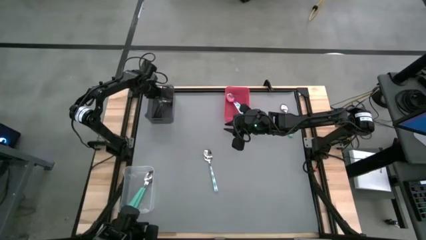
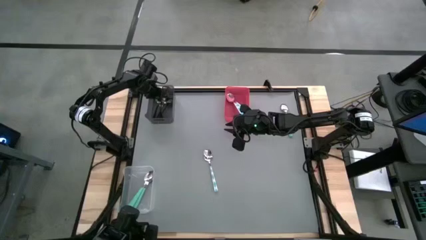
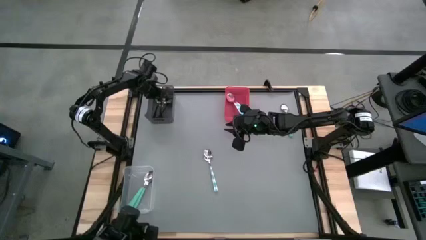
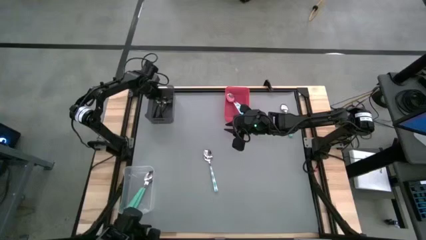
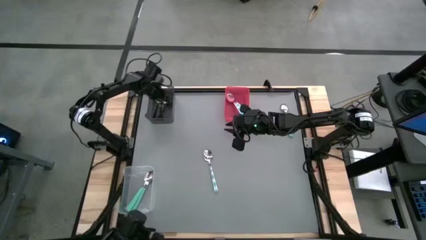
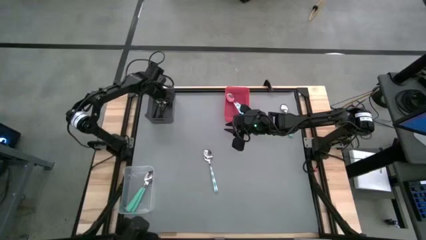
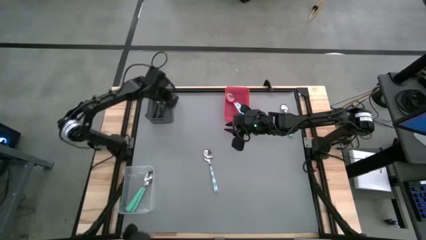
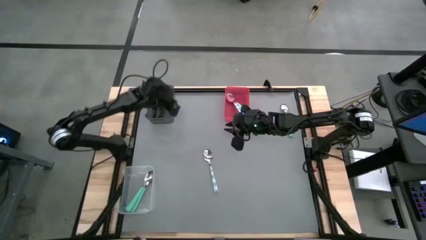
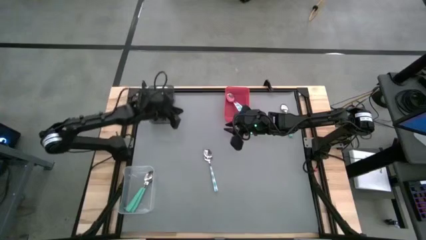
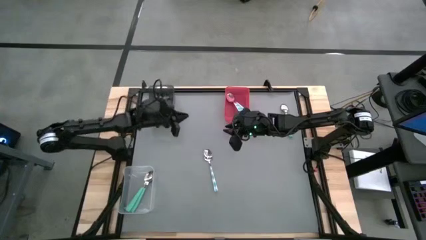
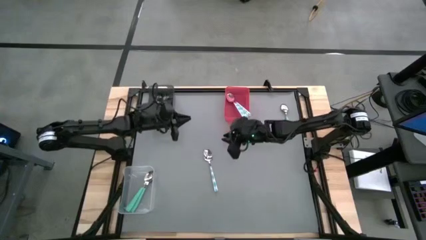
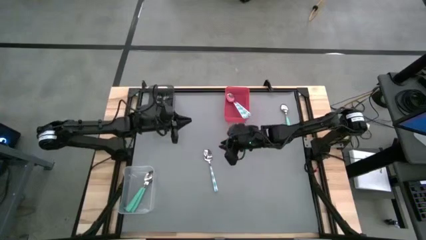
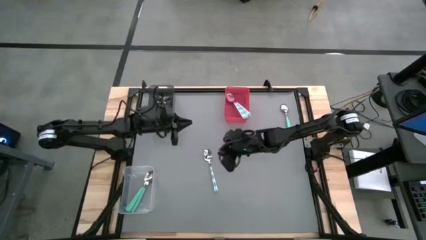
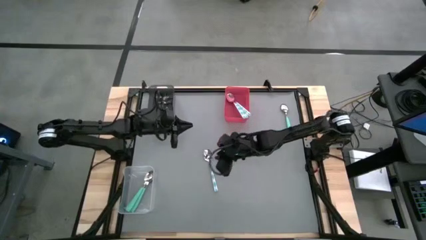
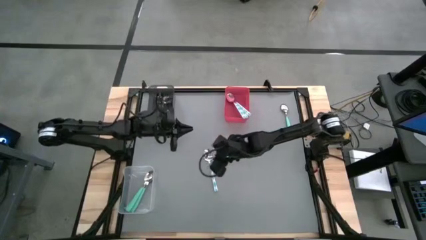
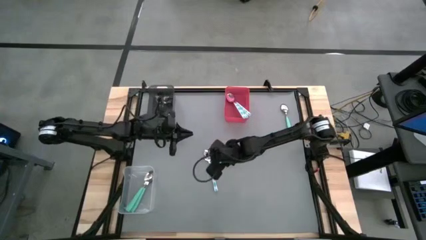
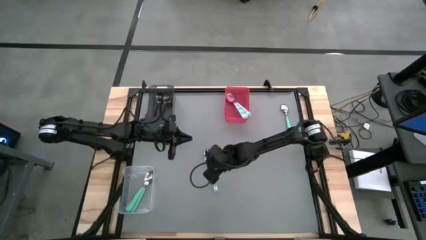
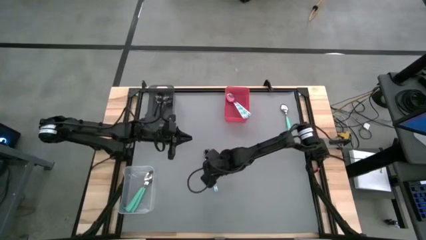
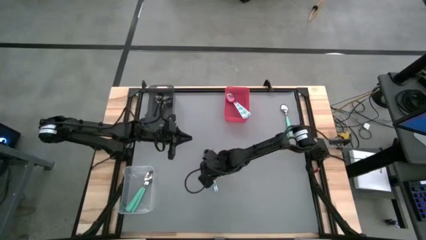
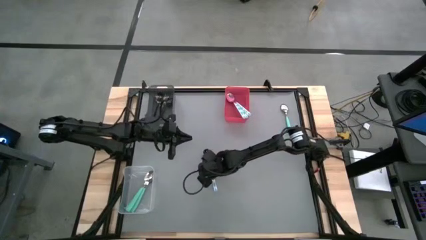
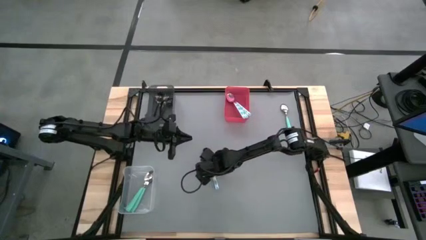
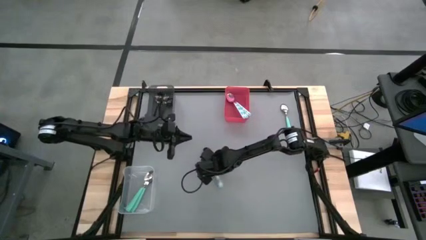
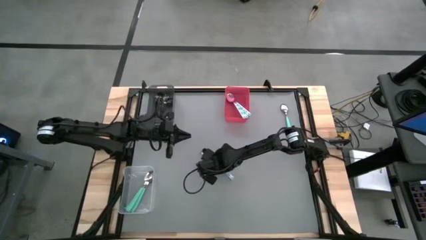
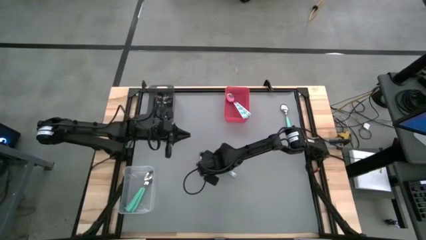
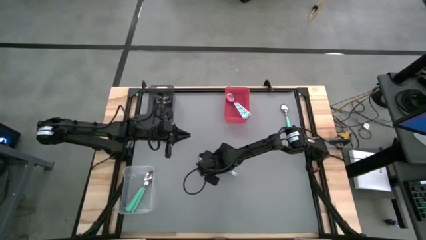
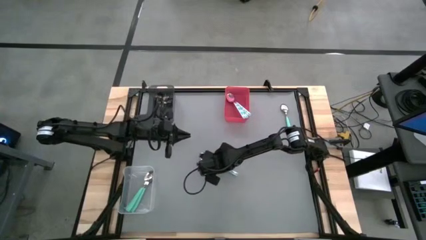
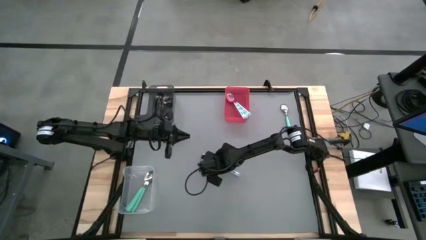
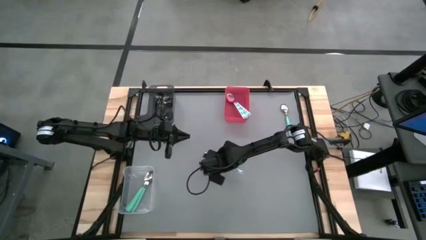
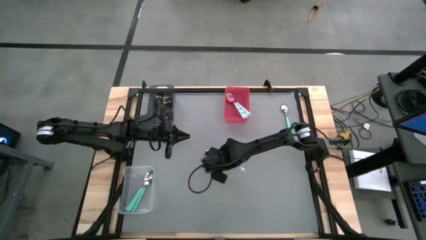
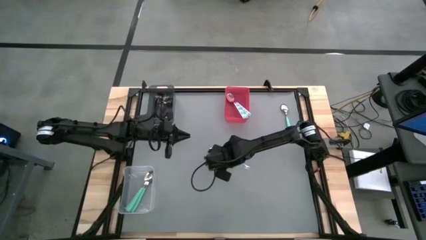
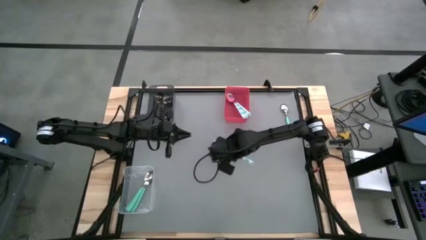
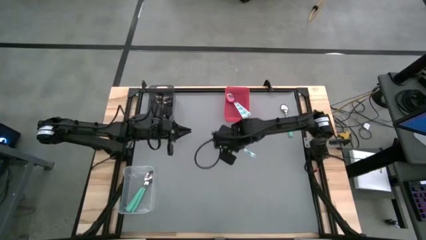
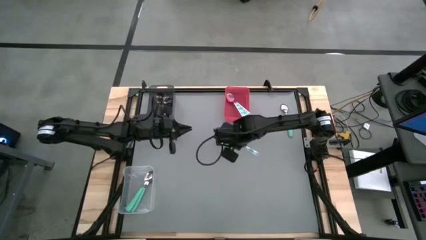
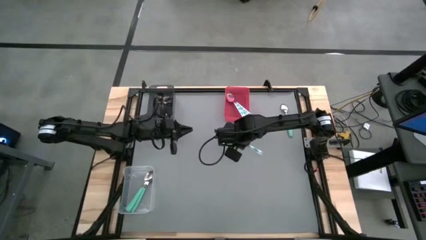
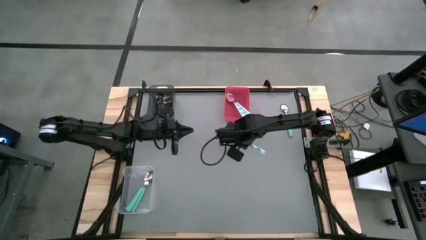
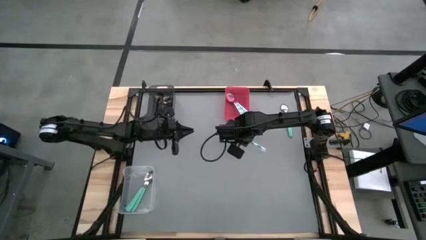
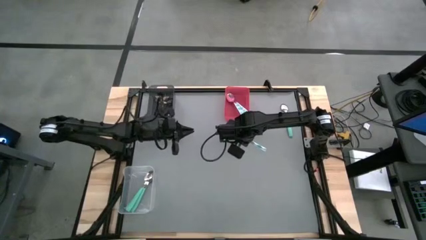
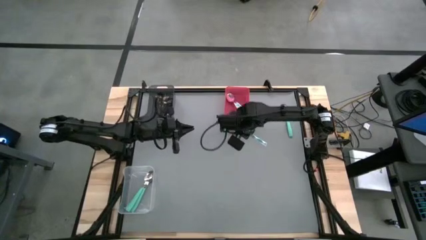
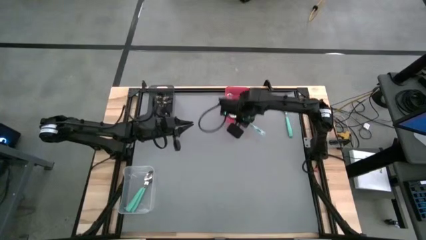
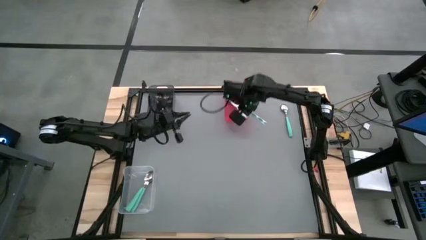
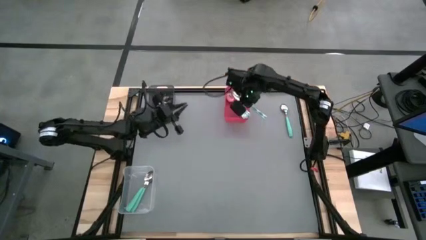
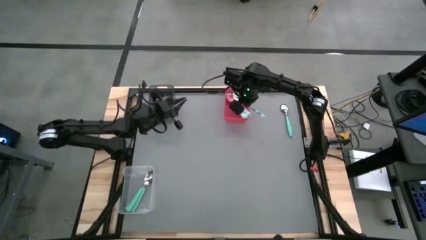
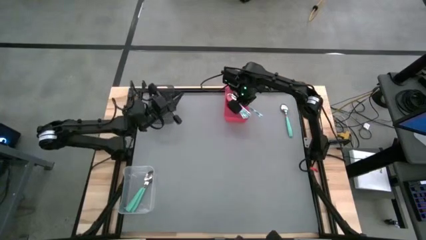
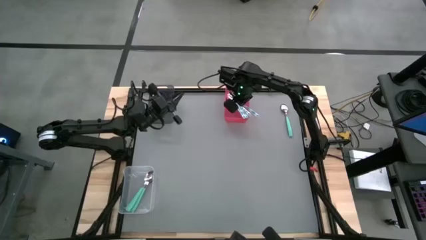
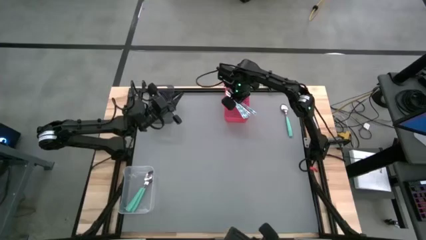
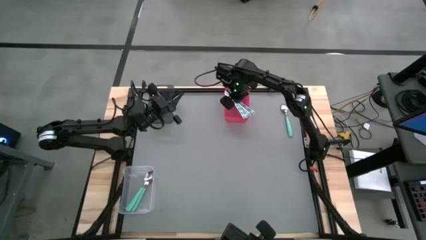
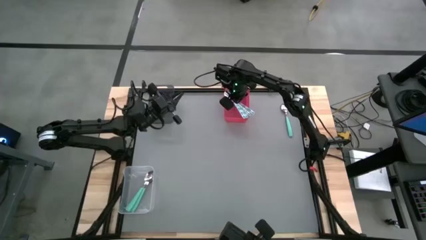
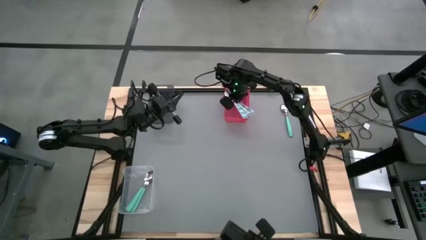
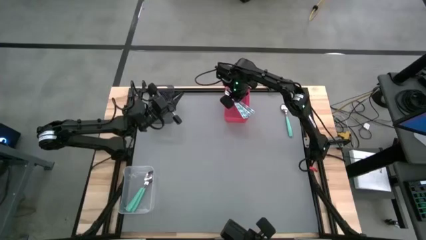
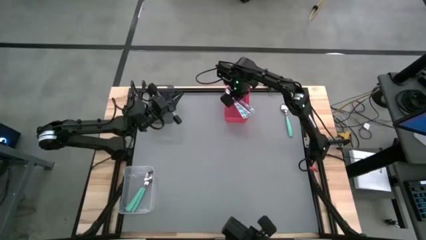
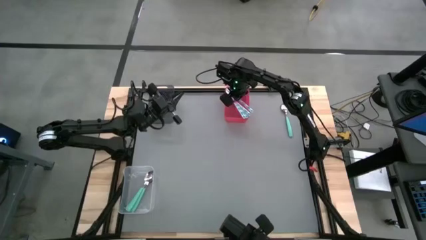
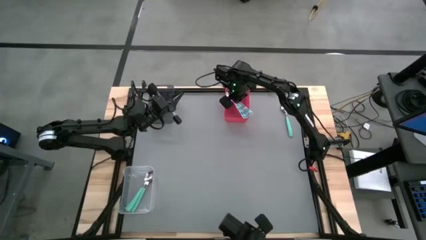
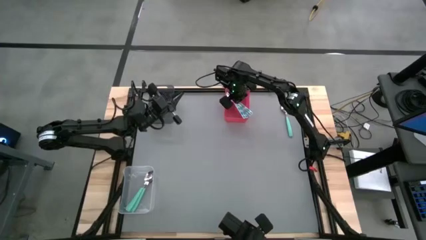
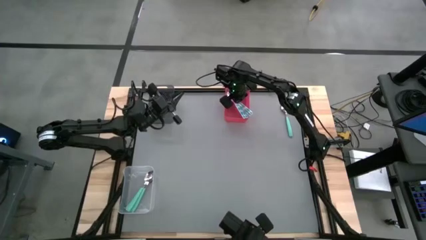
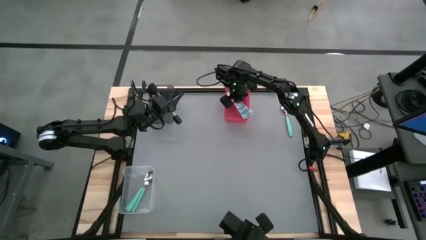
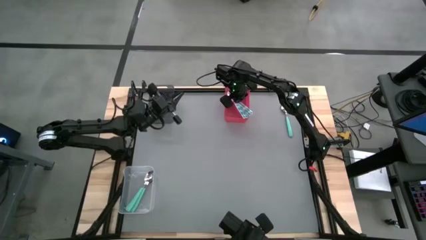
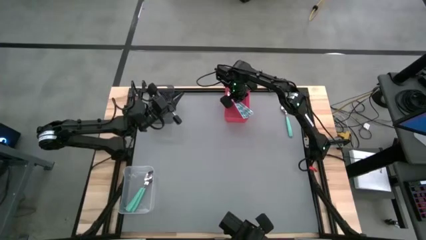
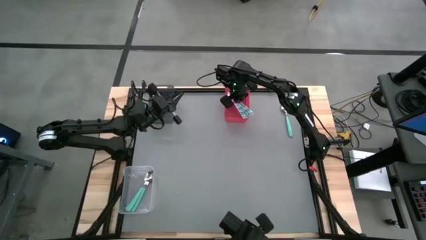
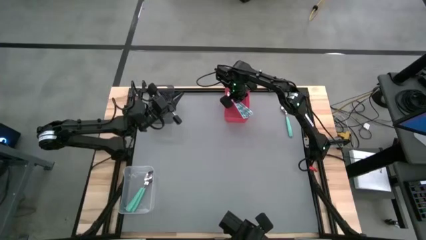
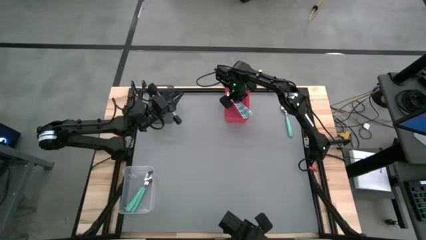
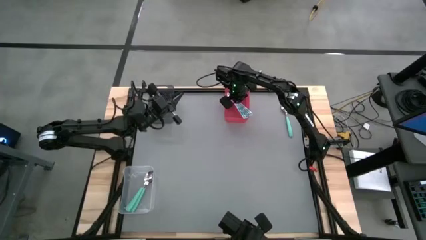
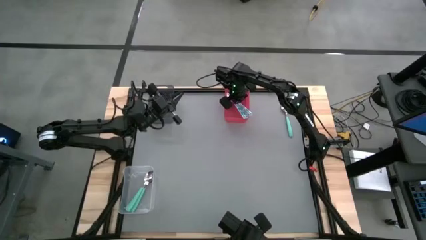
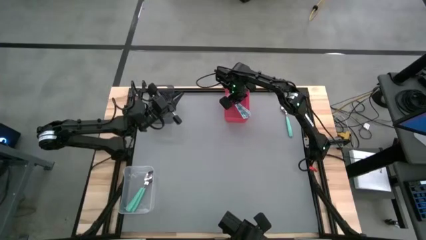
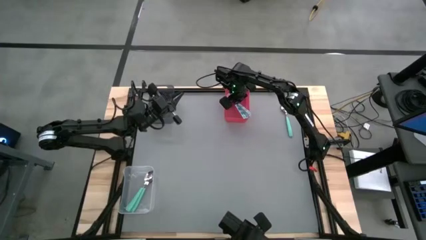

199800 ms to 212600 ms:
Task: Sort silverware by color (type)
Put the white green spoon into the red bin

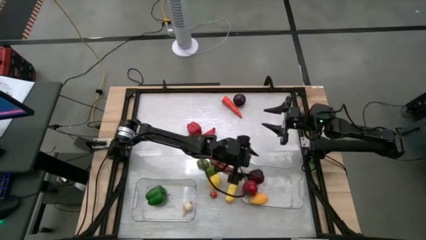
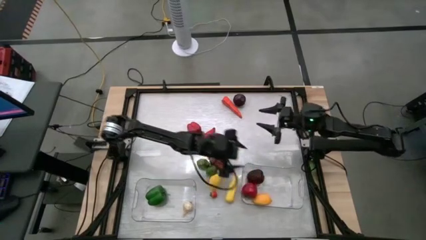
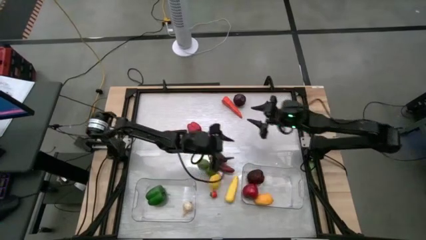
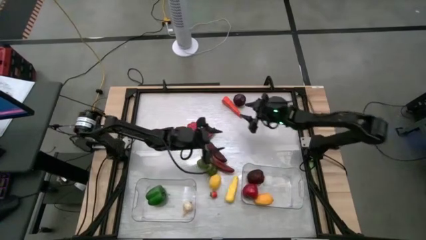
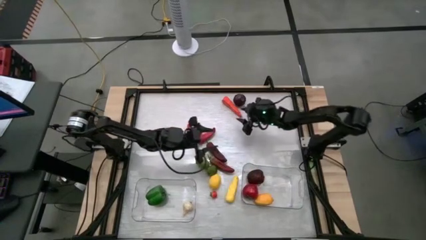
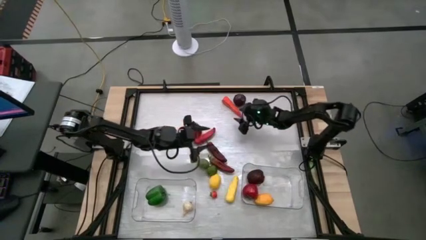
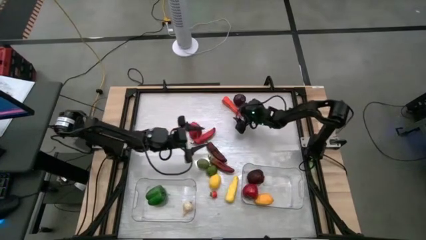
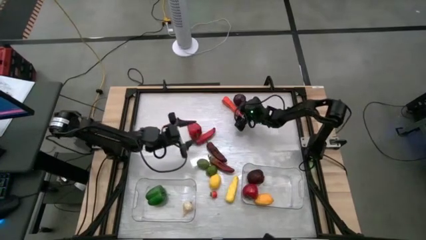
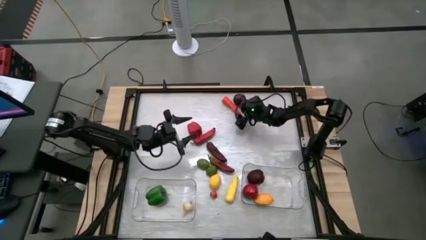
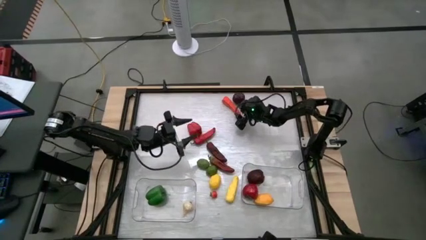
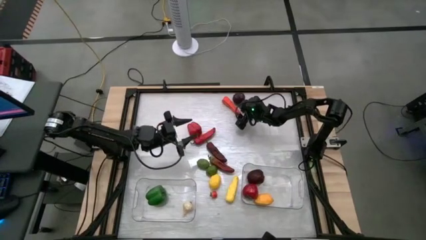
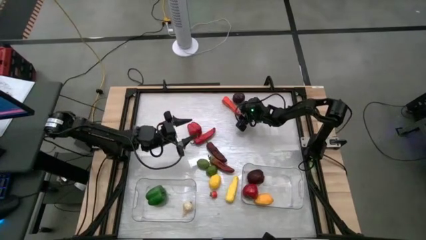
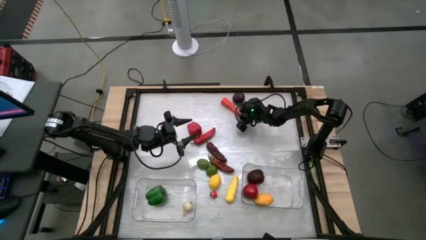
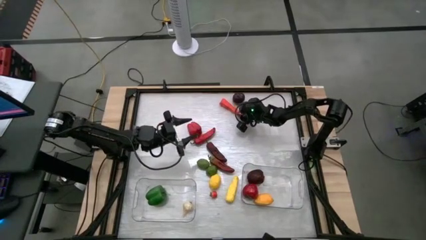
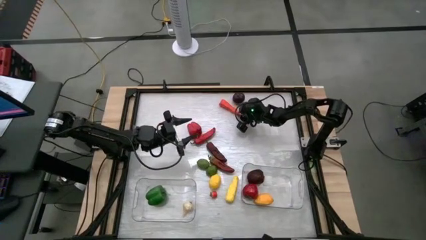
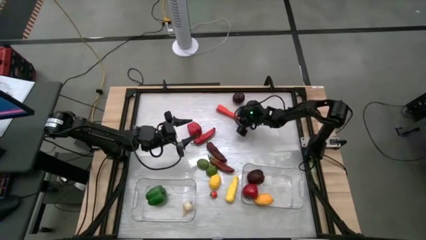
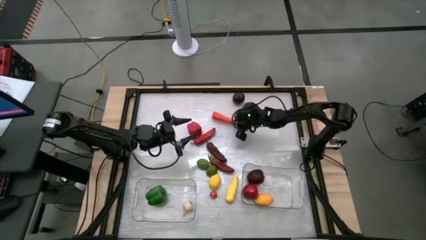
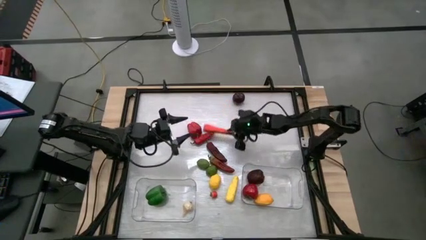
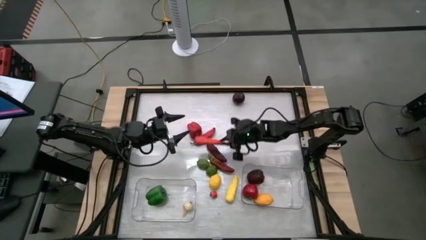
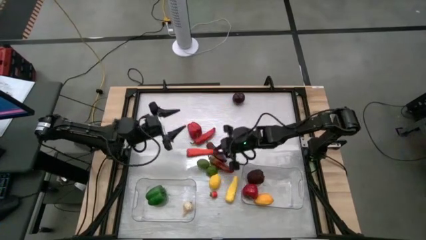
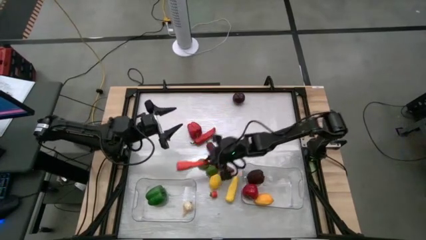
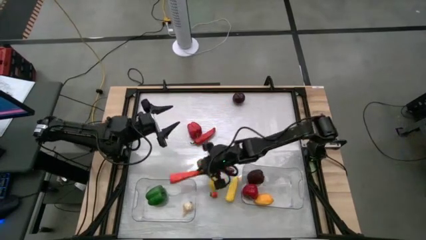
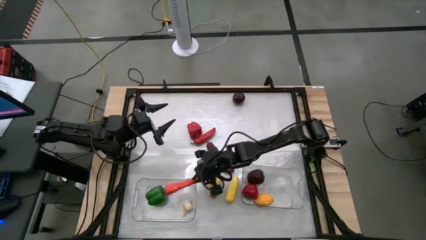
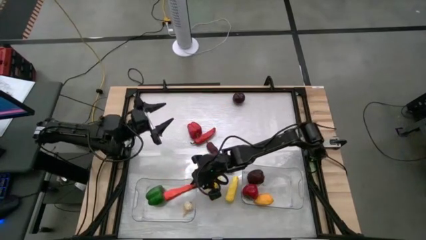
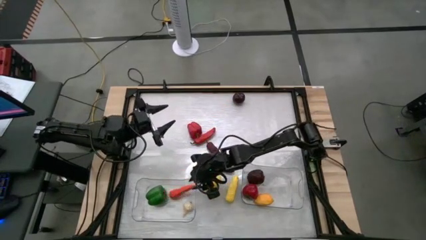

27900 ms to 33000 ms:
Task: Sort produce into baskets
Put the carrot into the left transparent bin
